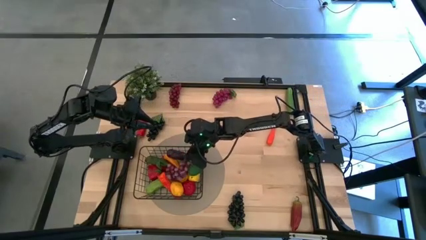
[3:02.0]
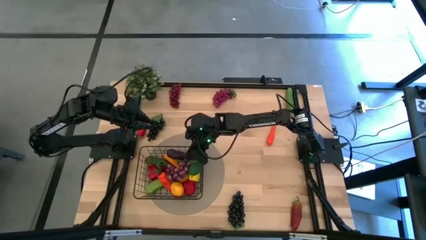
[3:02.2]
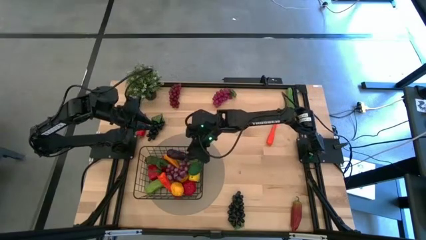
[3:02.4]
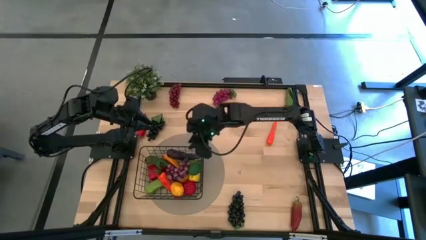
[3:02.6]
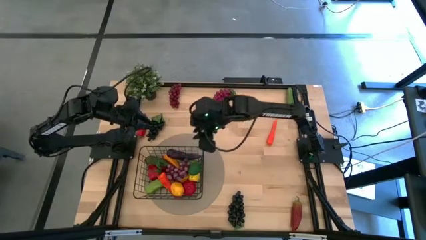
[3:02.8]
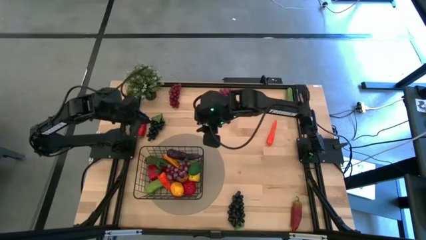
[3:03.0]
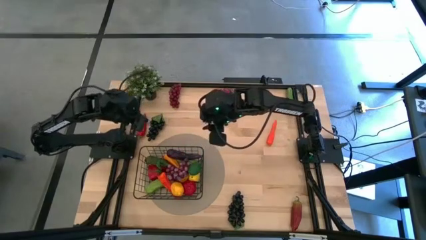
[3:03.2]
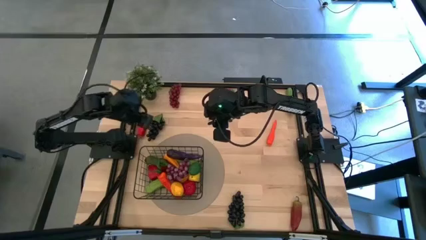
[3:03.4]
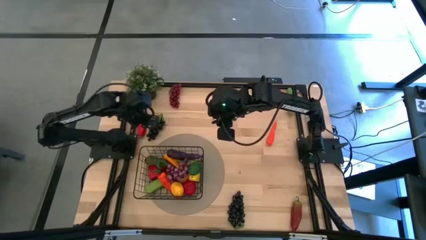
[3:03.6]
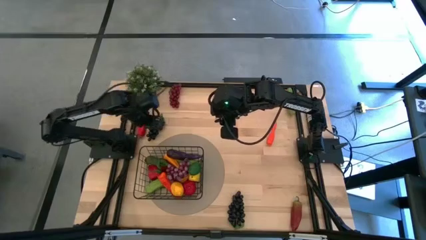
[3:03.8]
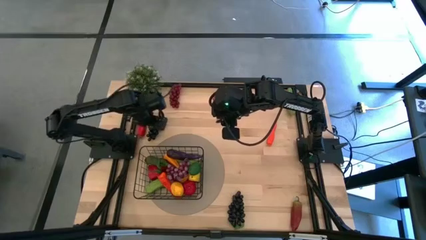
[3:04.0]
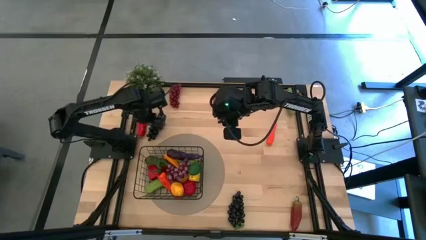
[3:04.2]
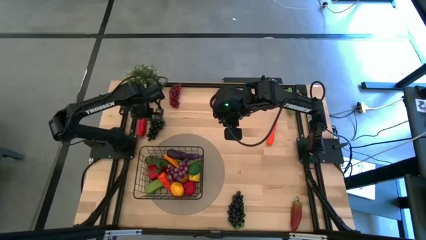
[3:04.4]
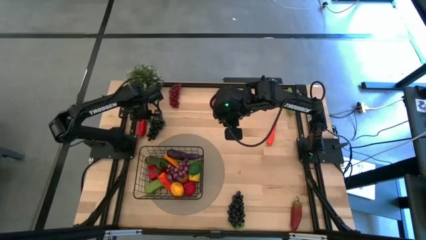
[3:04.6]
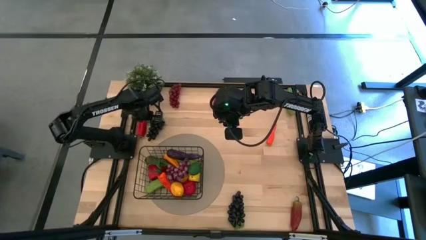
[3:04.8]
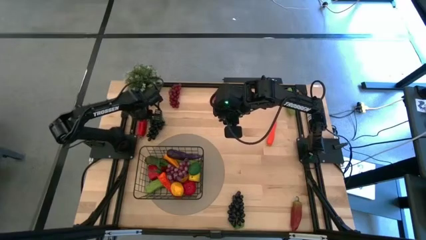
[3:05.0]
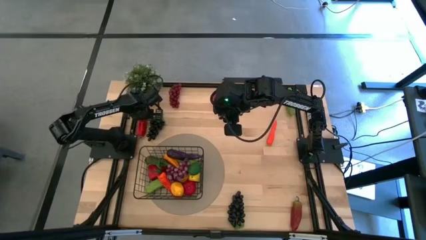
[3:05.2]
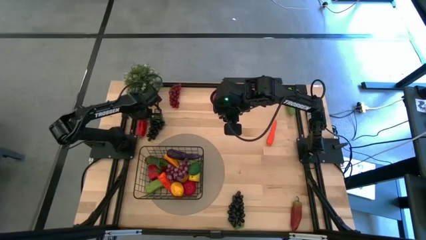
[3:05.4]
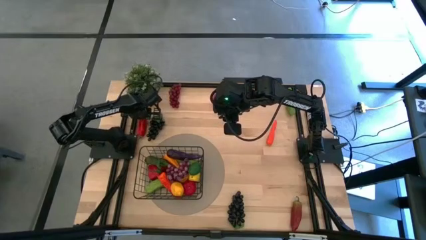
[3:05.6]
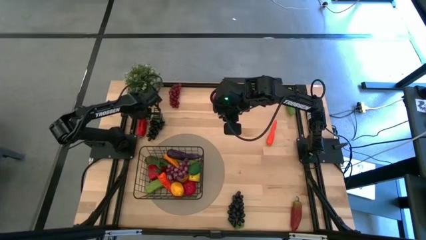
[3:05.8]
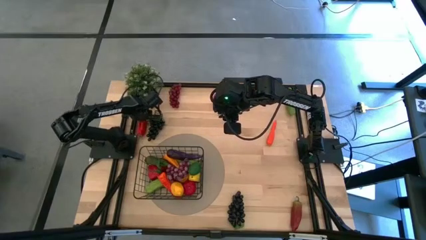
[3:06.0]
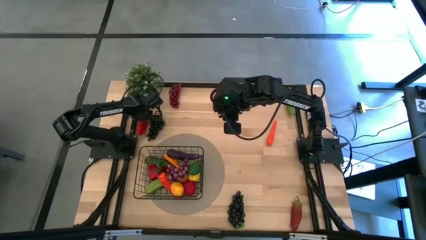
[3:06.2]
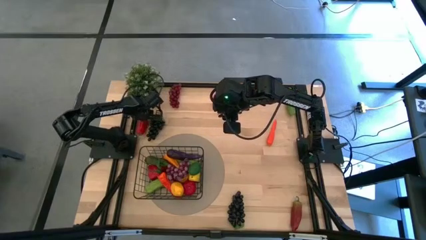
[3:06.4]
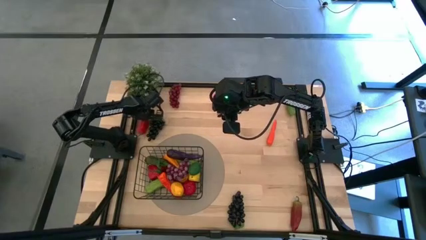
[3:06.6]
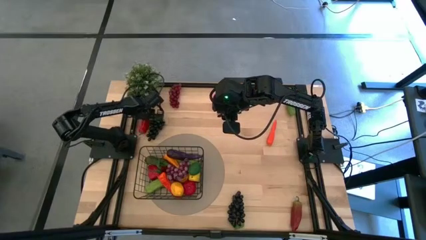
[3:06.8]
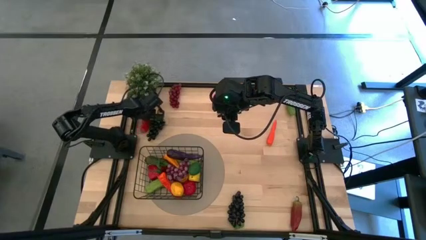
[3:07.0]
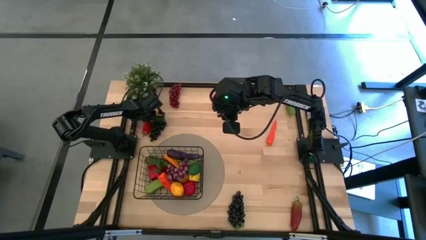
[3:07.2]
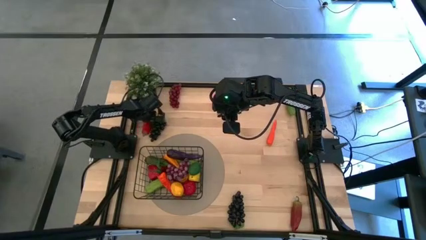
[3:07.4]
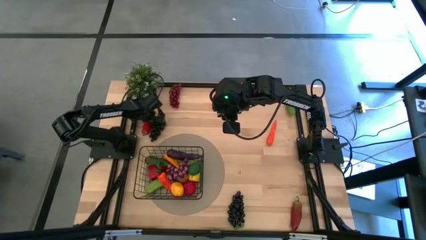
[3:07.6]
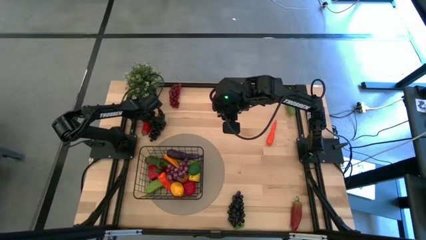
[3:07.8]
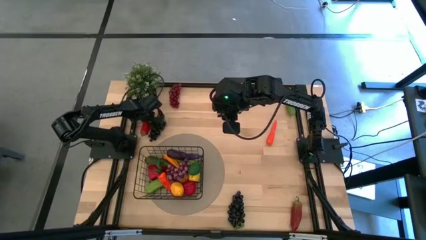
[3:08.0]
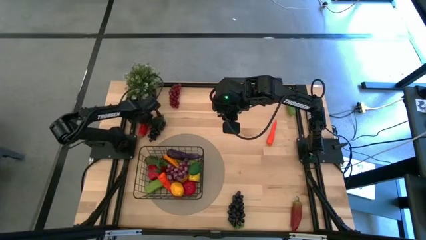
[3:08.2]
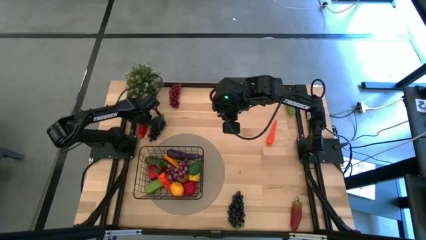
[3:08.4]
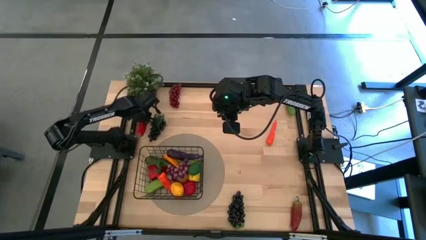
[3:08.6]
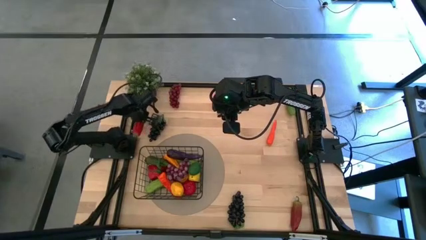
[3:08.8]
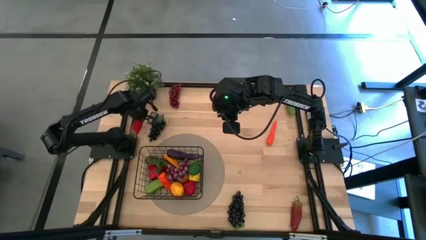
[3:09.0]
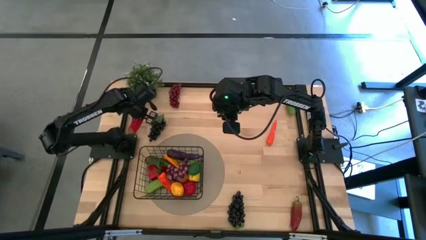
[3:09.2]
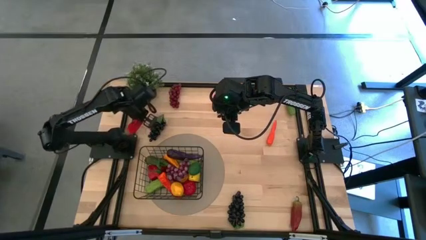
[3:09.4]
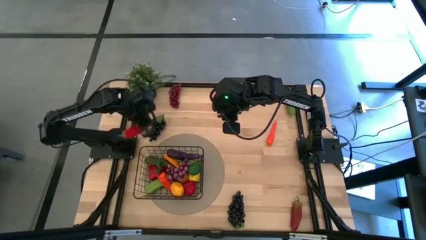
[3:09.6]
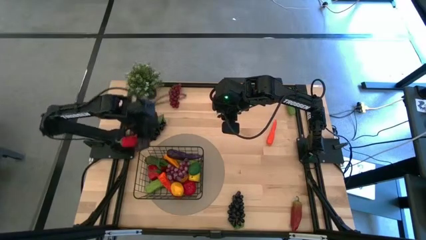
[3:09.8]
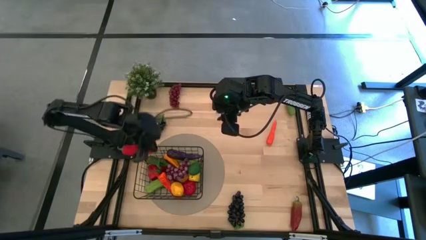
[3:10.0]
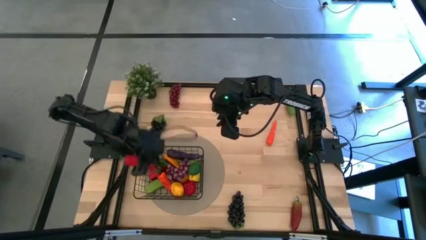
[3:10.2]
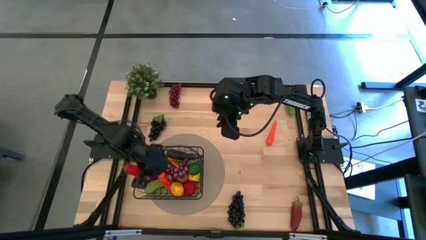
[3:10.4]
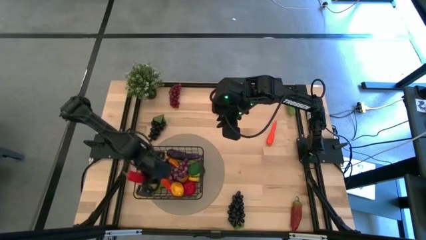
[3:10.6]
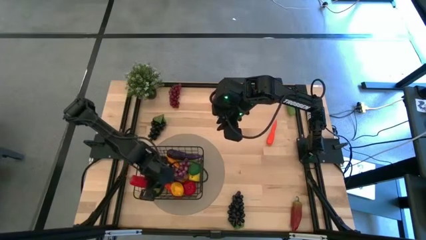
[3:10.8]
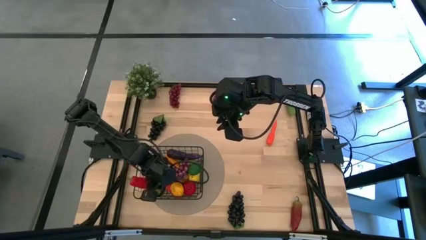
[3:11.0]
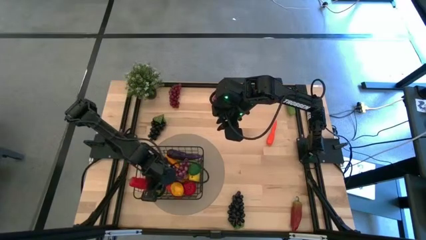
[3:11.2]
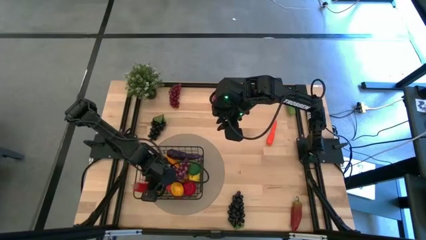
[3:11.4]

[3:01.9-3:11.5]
Task: Build produce basket
Put the red chili pepper into the black wire basket

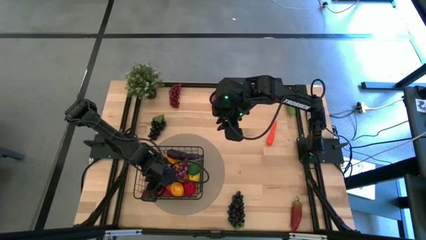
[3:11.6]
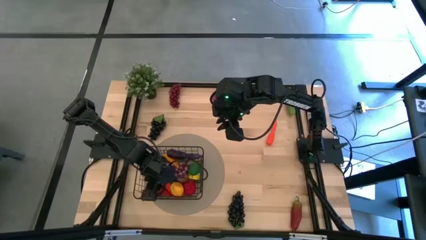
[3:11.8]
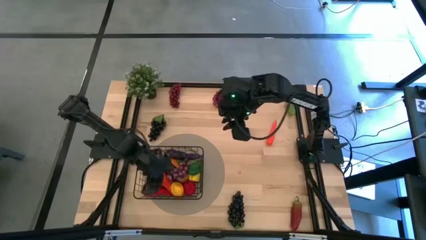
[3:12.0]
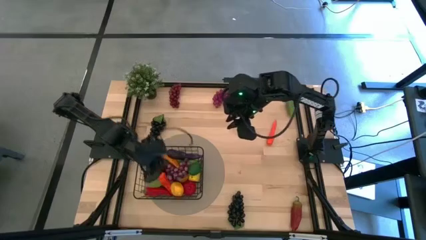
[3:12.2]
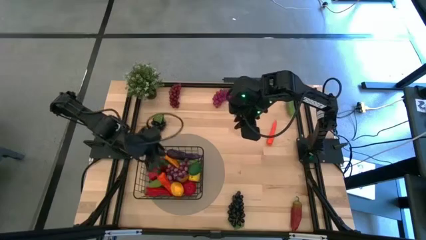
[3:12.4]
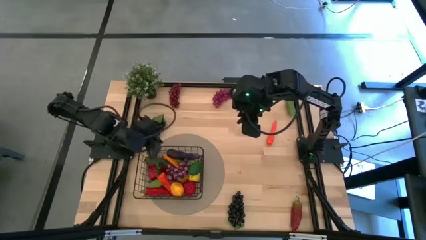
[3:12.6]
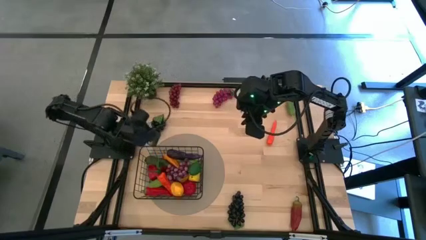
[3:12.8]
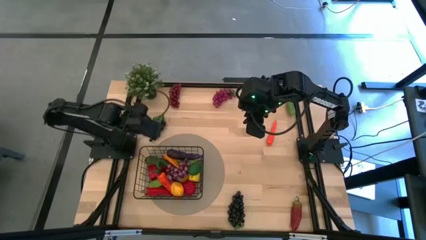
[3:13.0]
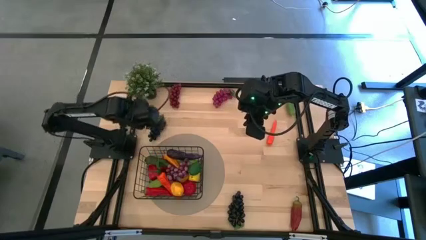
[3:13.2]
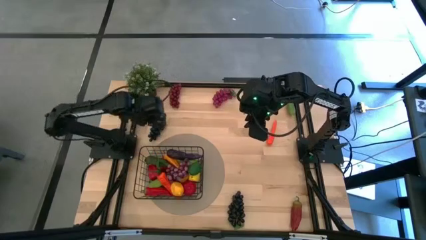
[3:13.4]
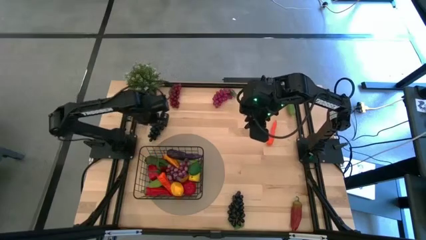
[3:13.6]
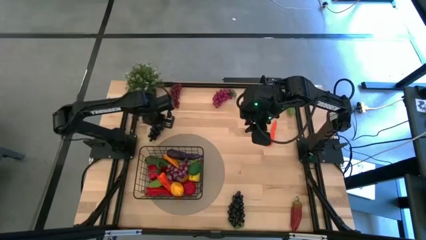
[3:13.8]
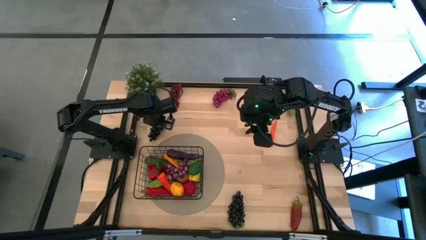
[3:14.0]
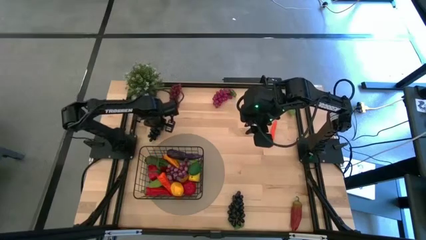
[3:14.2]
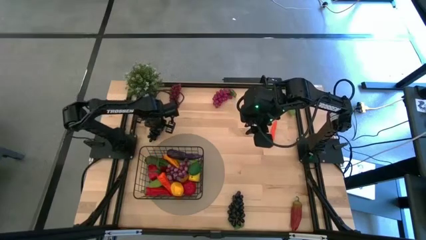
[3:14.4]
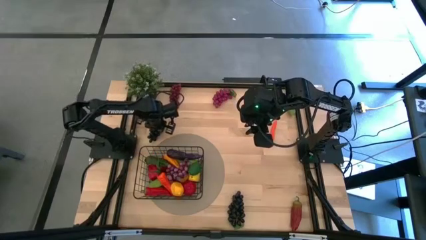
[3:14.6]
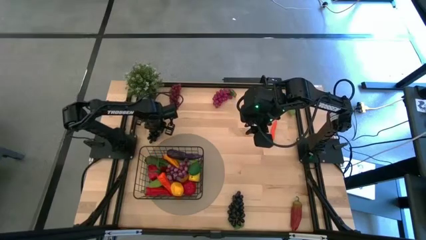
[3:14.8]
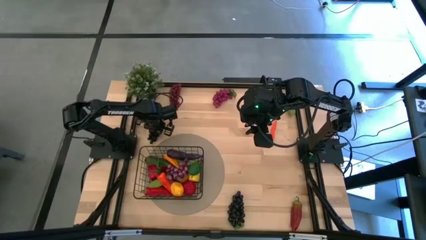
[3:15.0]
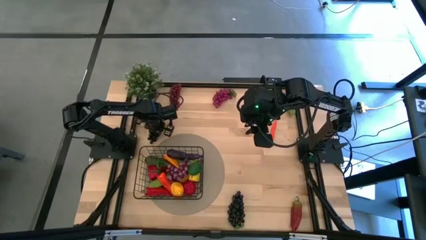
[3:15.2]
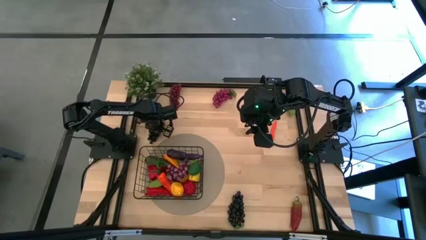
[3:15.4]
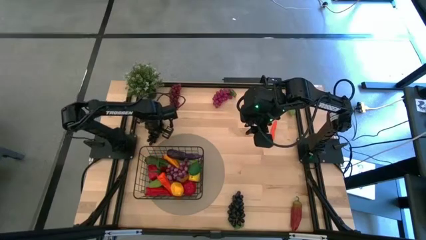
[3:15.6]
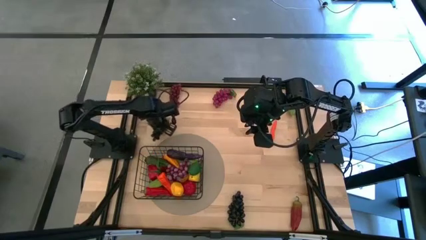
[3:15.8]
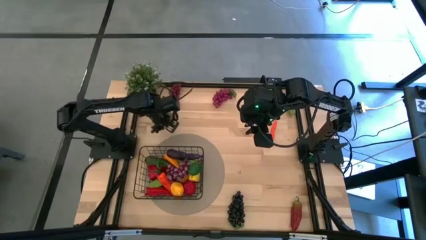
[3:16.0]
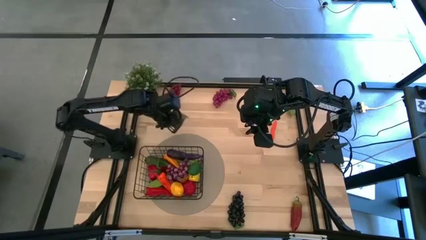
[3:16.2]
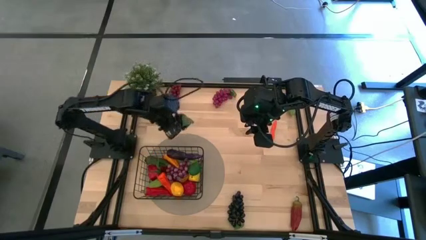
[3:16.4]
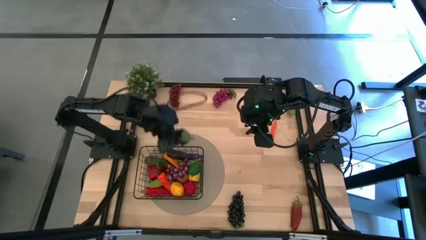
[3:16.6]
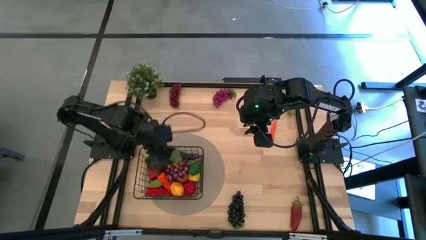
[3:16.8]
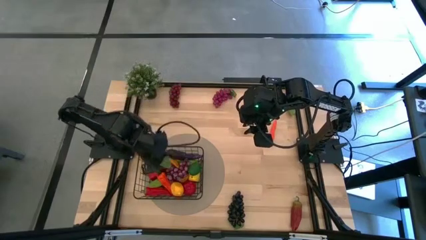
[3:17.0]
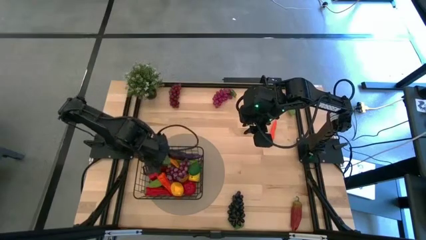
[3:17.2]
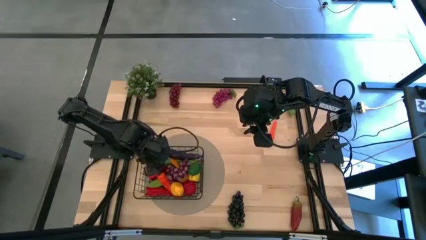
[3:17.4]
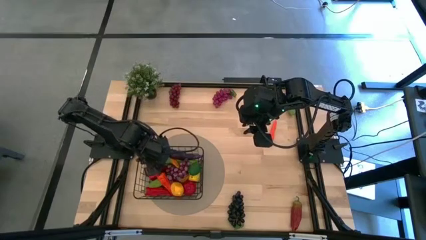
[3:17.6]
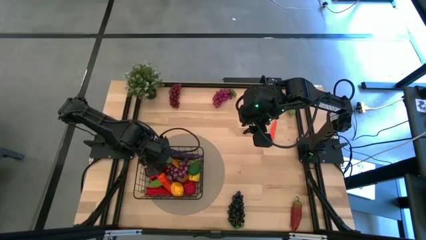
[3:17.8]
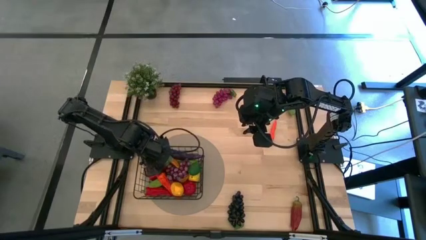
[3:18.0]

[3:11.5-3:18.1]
Put the top black grapes into the black wire basket
